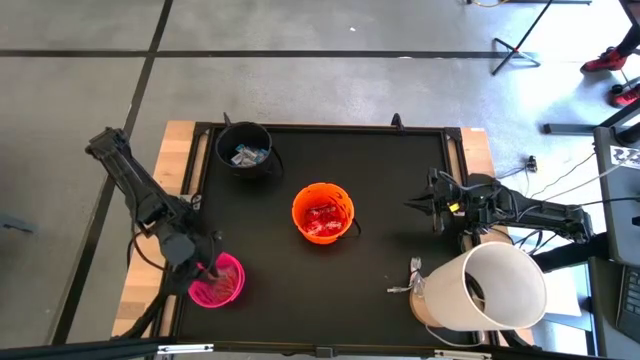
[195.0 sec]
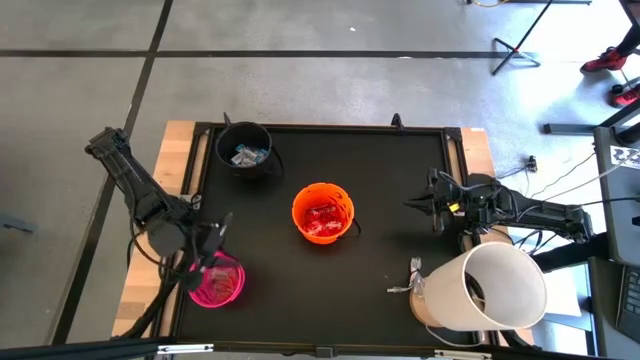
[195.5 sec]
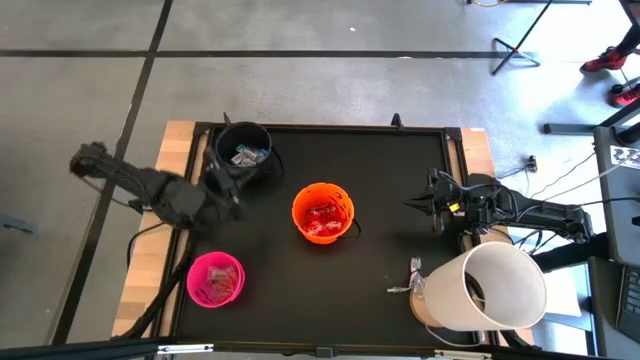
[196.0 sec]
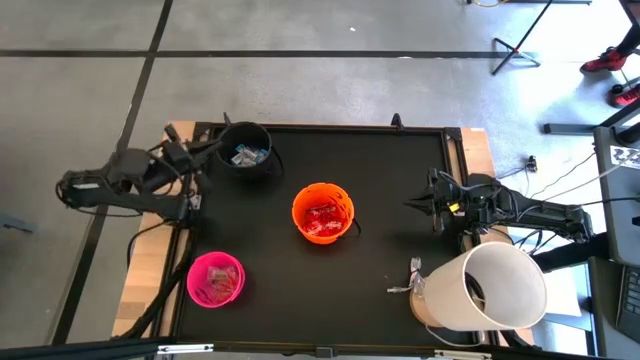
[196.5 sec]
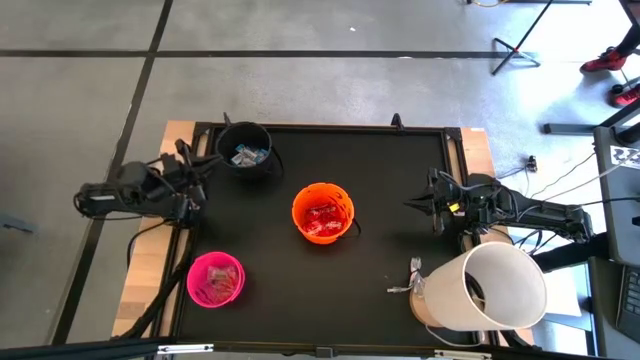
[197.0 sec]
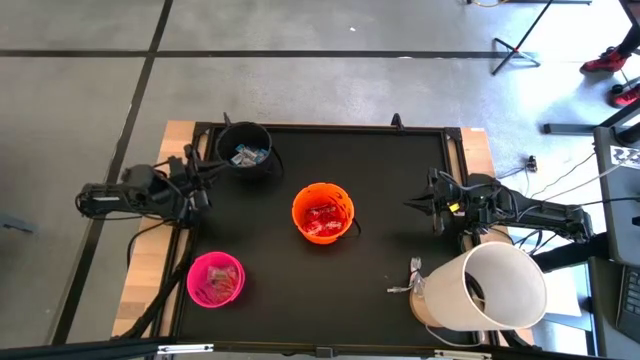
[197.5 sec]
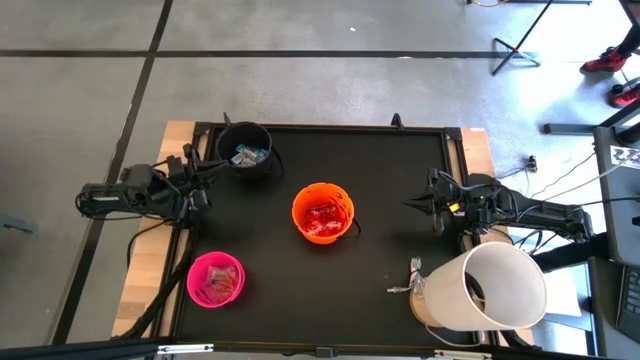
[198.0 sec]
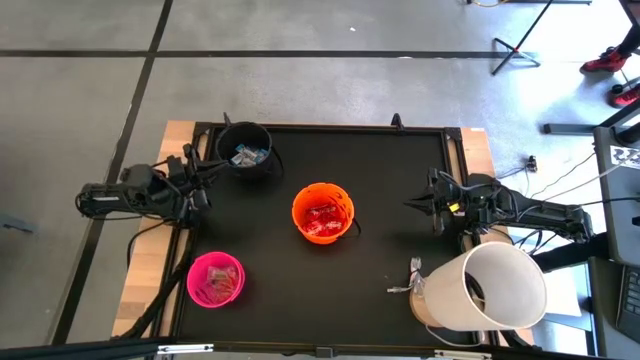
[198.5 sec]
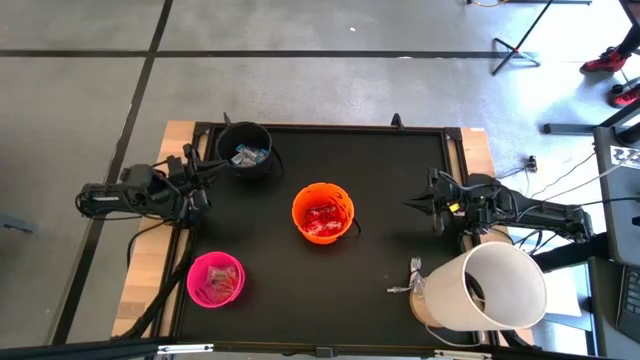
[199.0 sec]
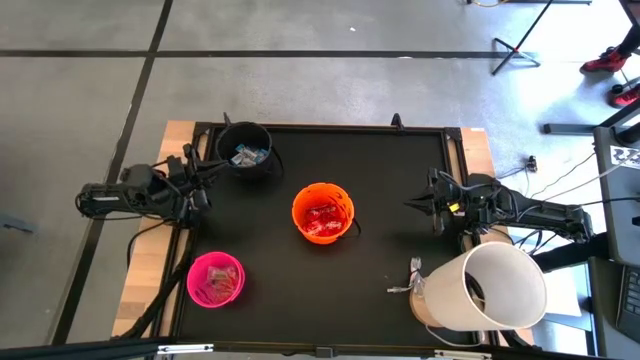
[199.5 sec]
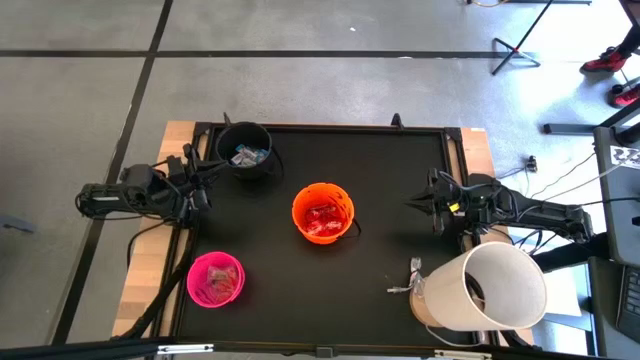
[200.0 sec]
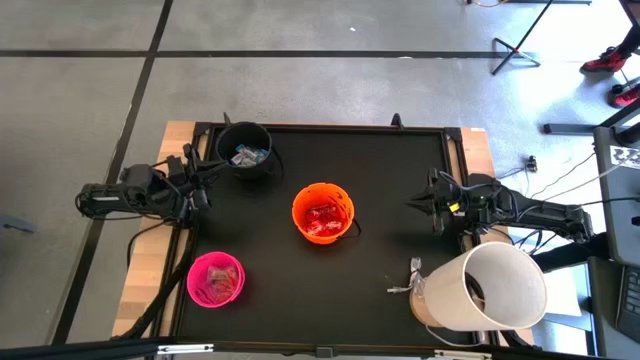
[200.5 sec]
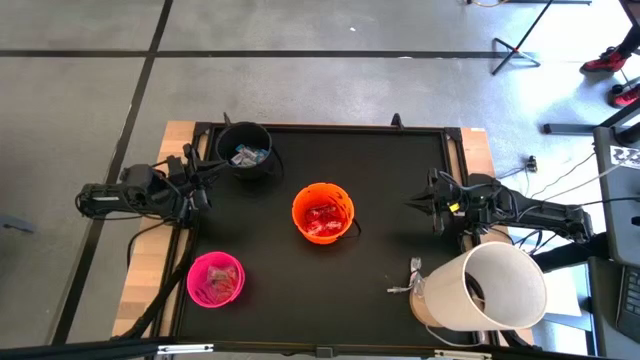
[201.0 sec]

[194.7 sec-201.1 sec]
Task: Sort candy
Return to Home Position

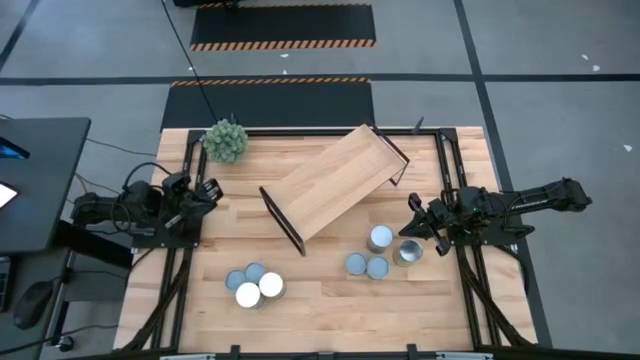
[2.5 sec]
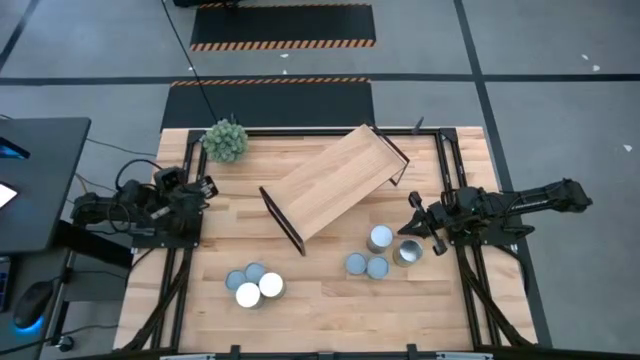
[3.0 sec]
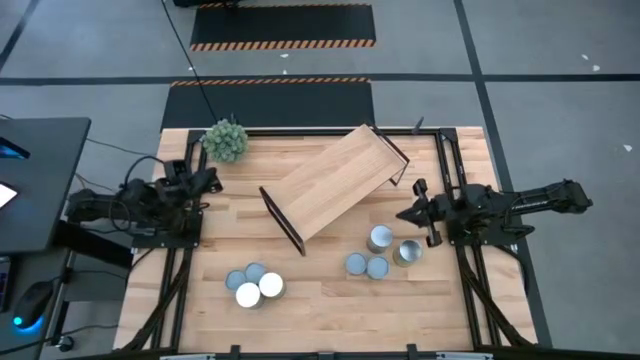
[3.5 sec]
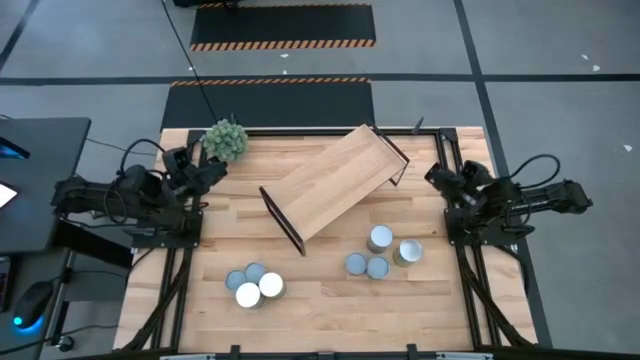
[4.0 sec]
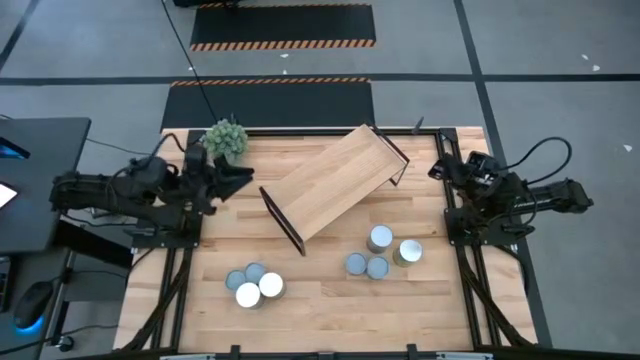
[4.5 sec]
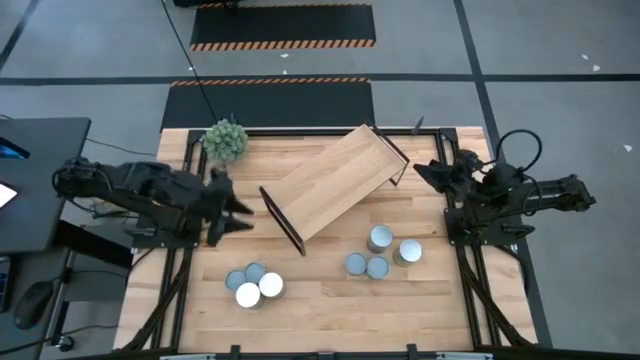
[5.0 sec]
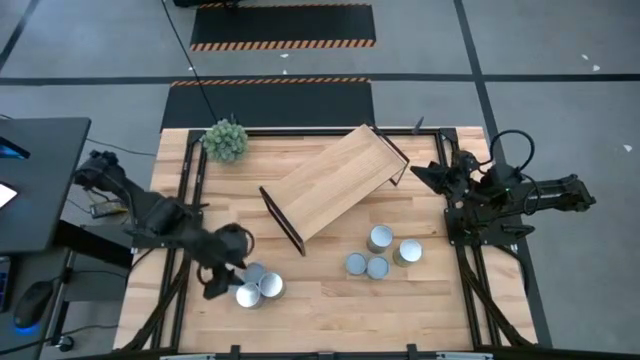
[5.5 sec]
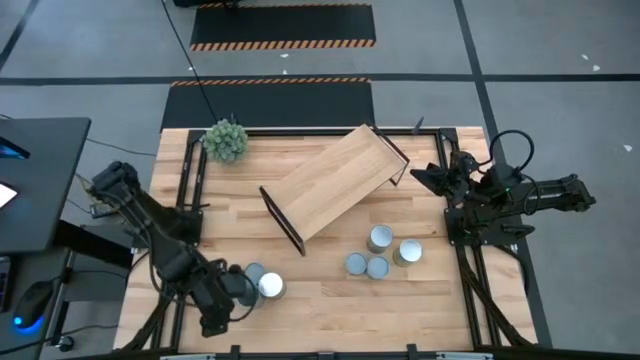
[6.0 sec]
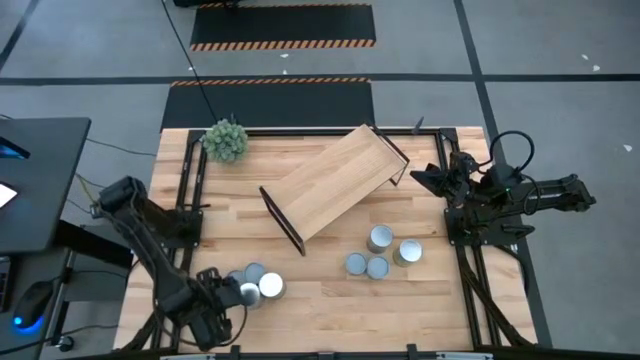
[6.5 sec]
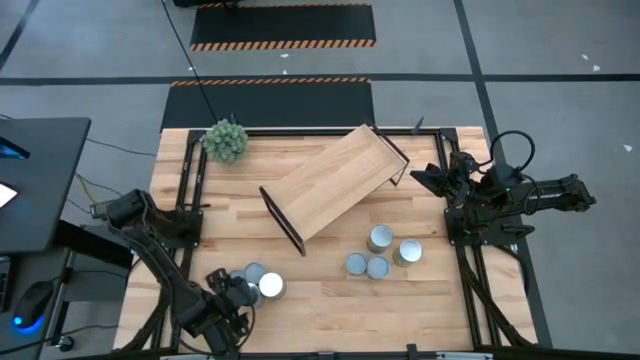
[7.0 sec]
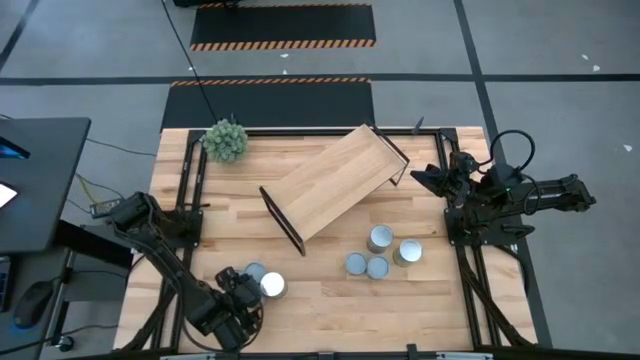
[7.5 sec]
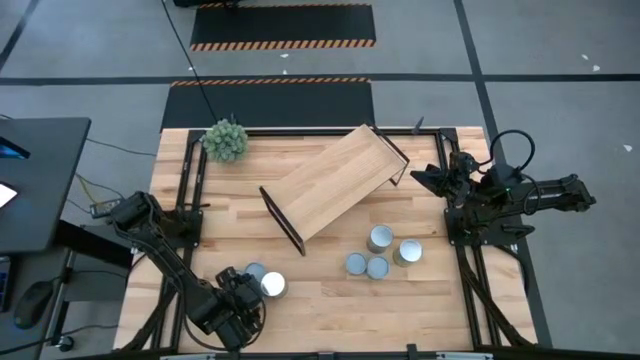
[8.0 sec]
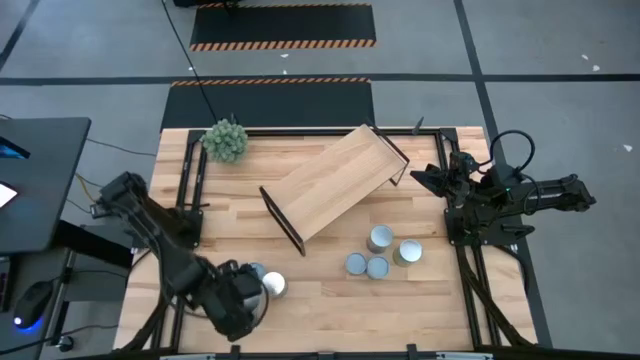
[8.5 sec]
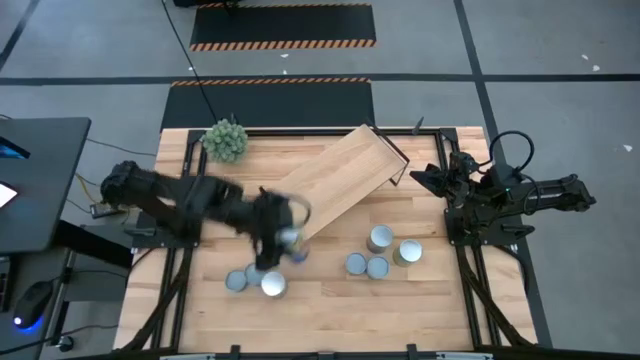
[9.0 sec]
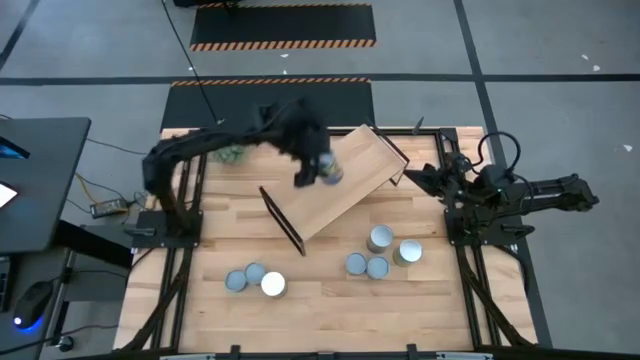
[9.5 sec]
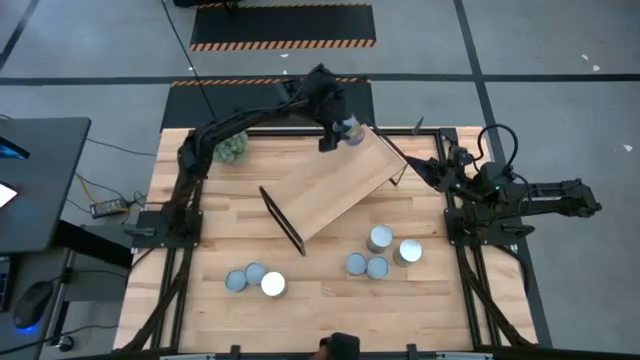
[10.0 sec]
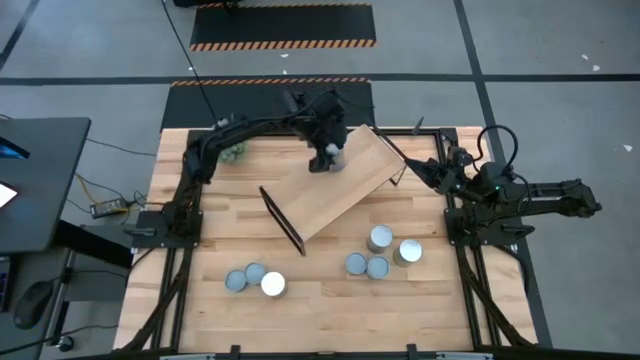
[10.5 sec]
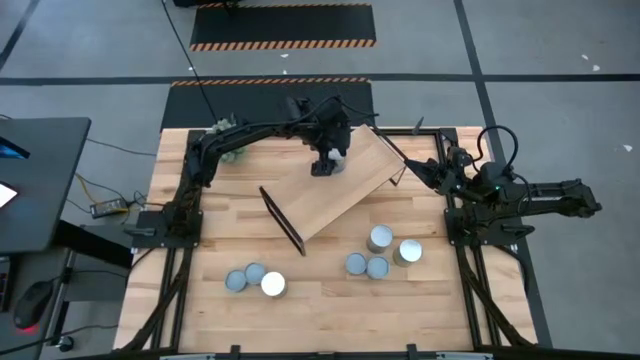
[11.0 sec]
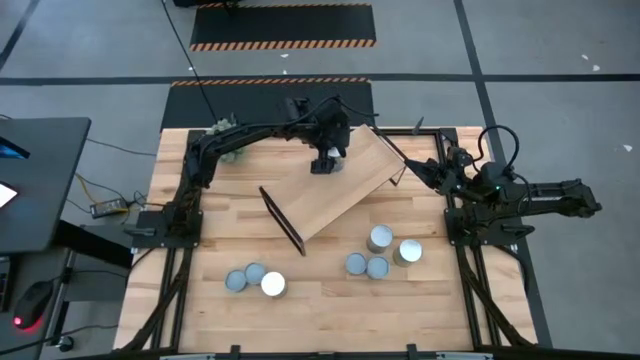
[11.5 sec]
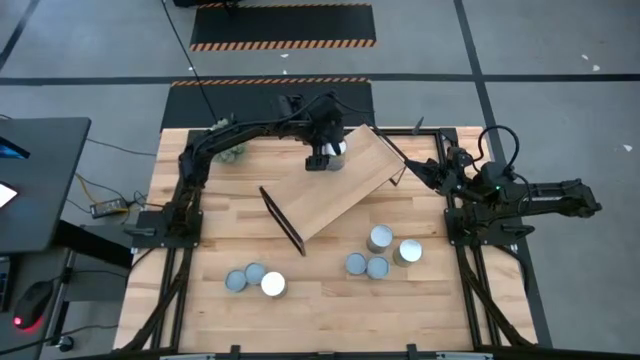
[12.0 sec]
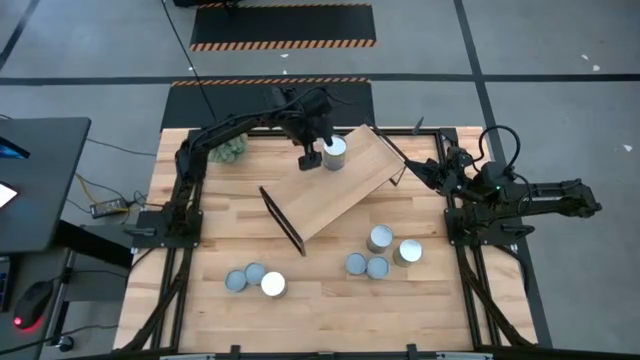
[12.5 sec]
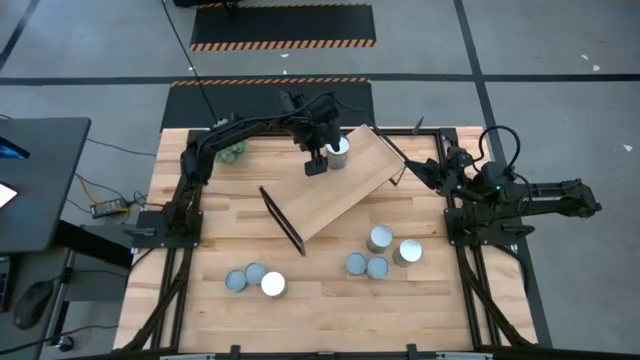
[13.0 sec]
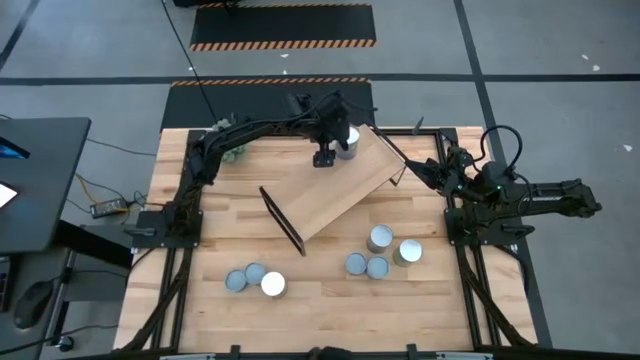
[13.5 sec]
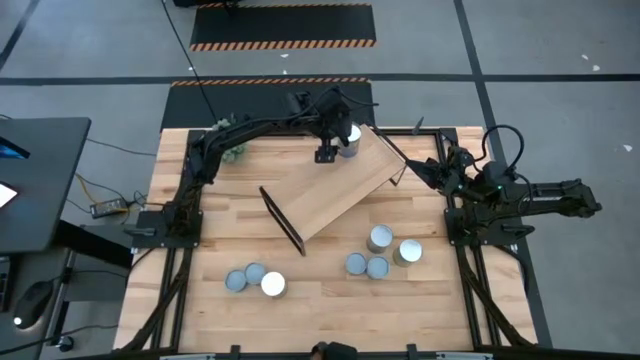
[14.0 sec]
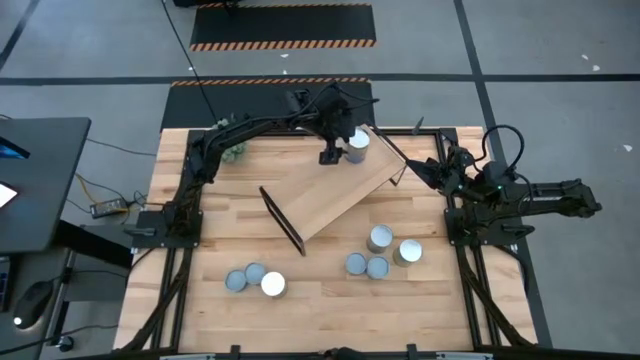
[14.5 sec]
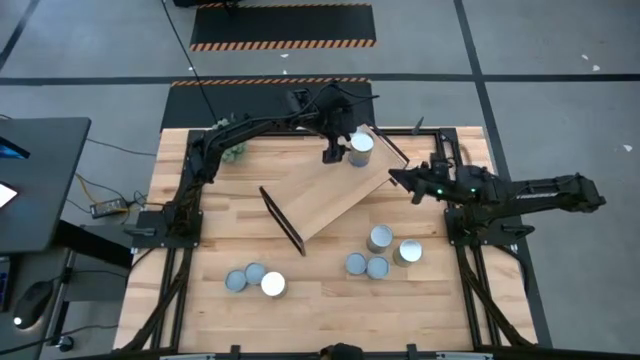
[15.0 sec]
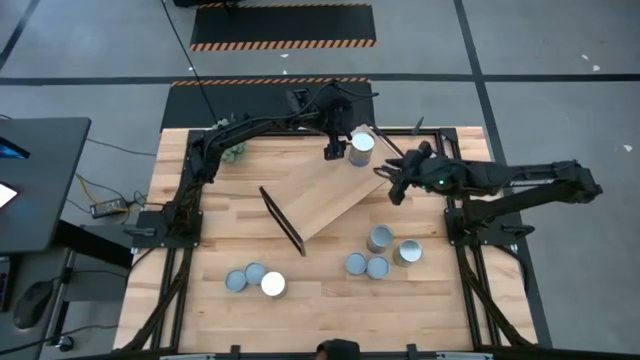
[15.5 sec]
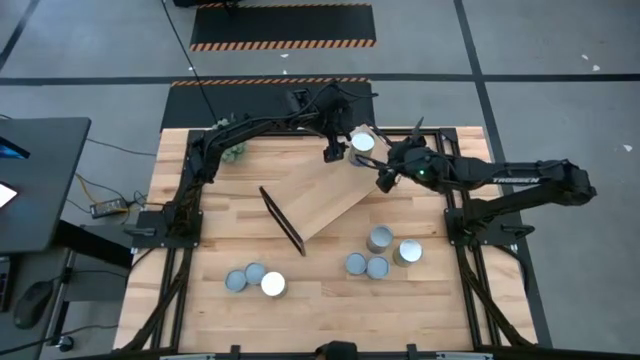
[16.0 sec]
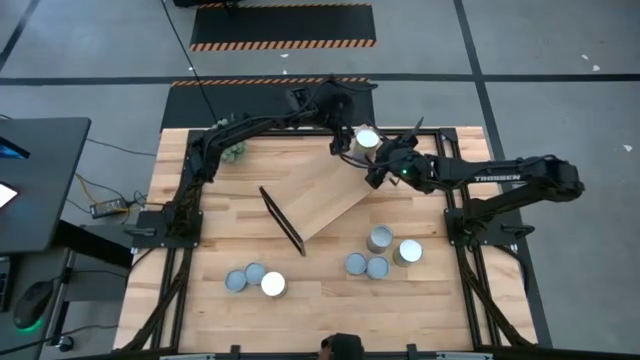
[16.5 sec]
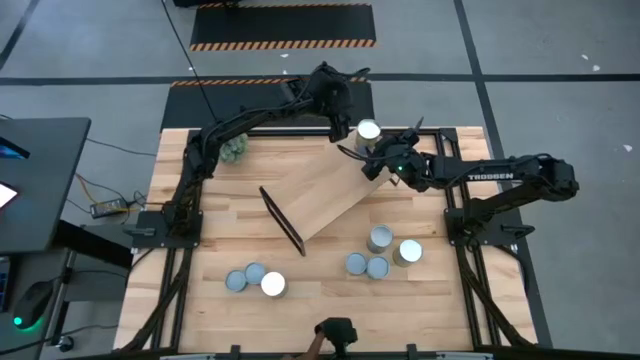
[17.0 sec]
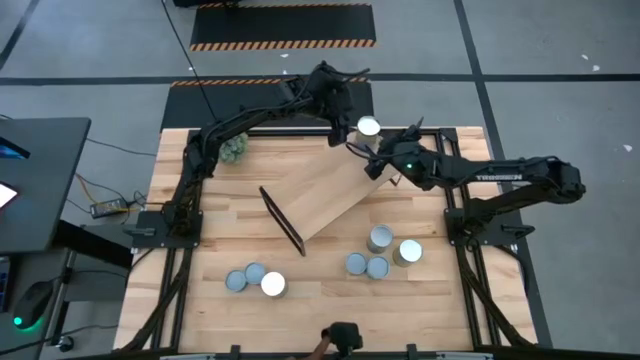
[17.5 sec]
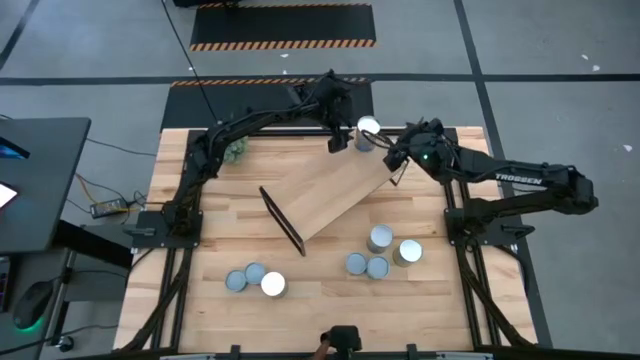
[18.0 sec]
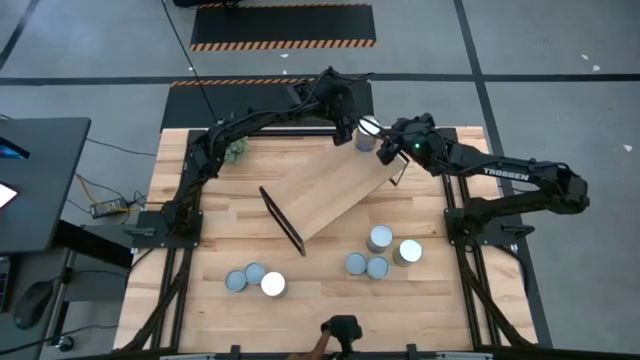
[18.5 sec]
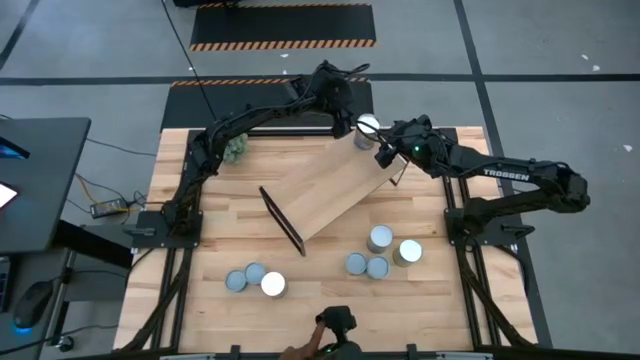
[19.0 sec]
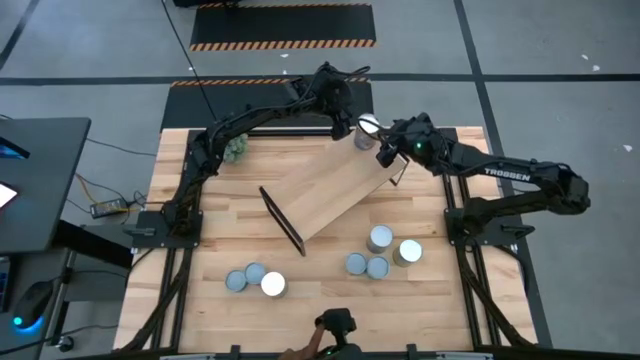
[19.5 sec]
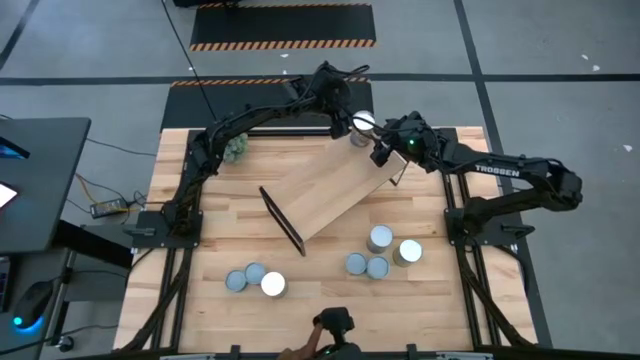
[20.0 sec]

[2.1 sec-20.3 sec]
Task: Pick and place cans onto a shelf
Put the canned peaches on the shelf
